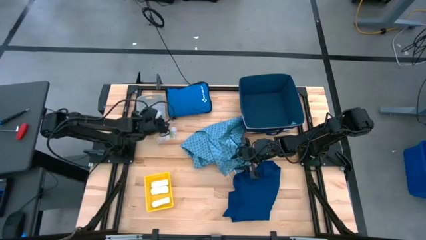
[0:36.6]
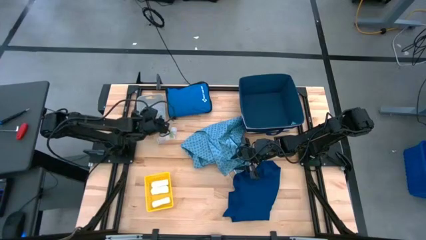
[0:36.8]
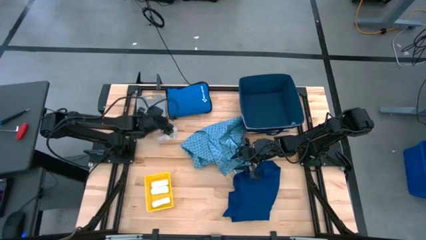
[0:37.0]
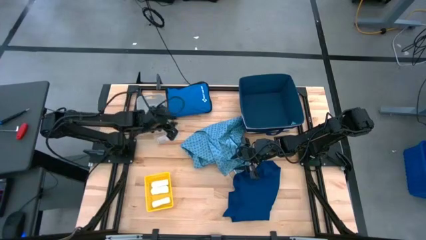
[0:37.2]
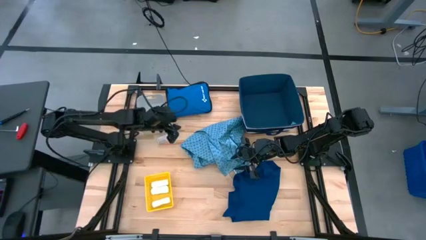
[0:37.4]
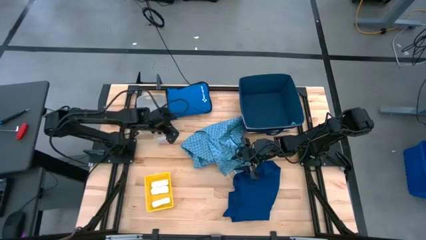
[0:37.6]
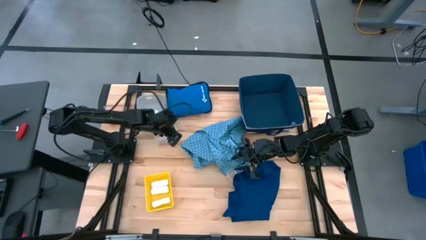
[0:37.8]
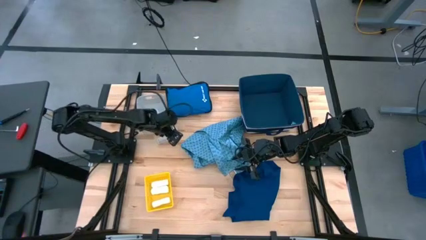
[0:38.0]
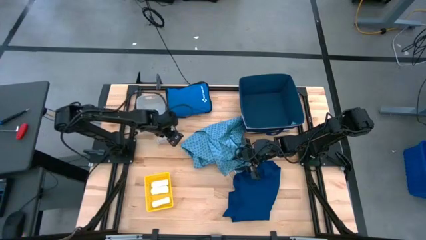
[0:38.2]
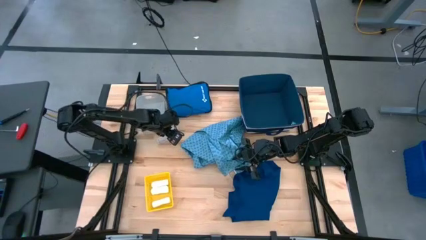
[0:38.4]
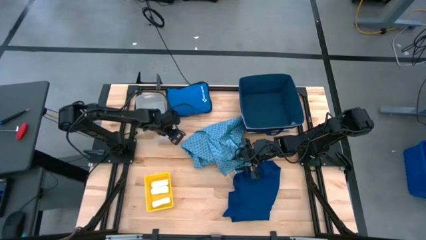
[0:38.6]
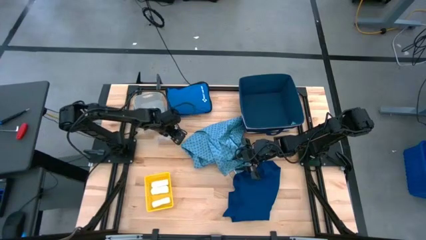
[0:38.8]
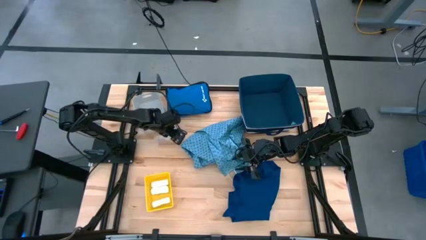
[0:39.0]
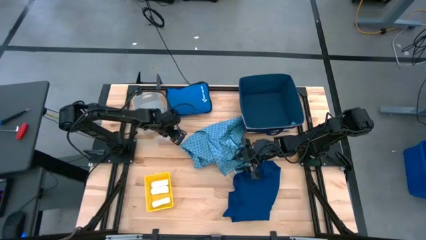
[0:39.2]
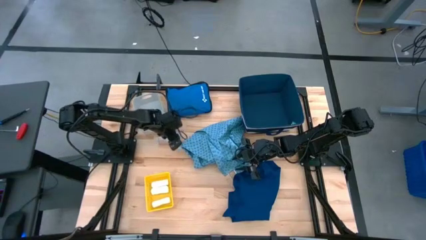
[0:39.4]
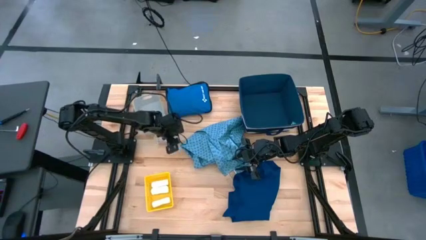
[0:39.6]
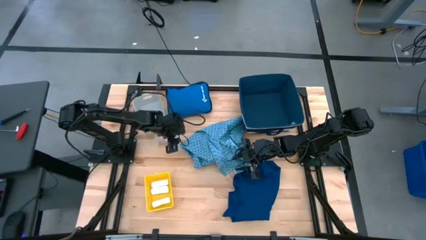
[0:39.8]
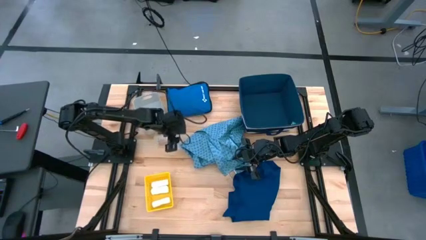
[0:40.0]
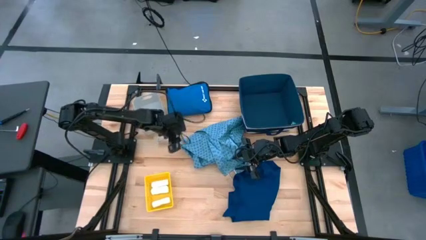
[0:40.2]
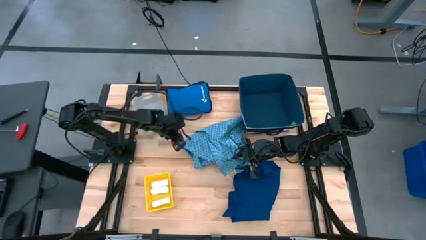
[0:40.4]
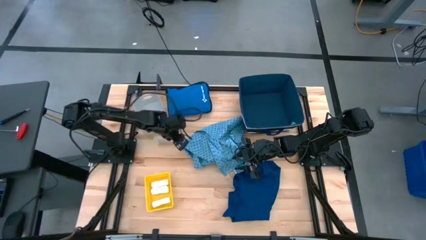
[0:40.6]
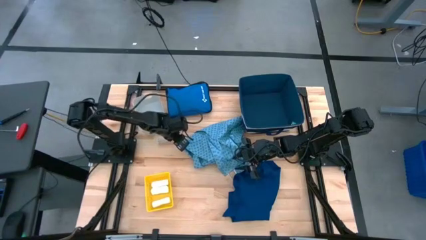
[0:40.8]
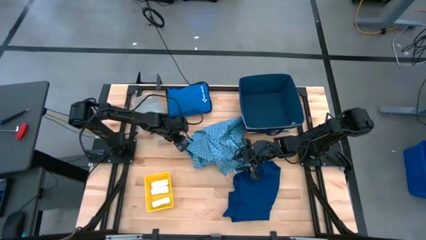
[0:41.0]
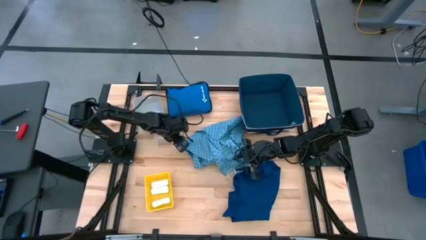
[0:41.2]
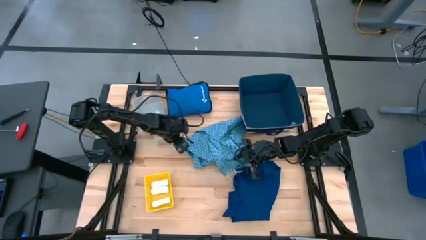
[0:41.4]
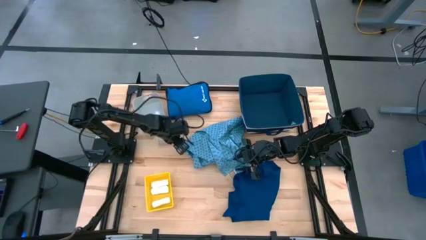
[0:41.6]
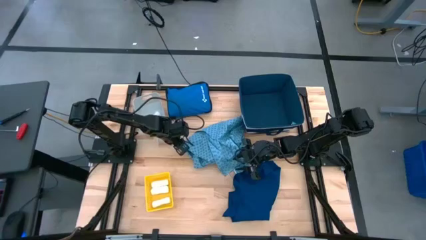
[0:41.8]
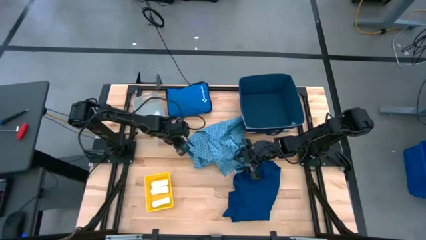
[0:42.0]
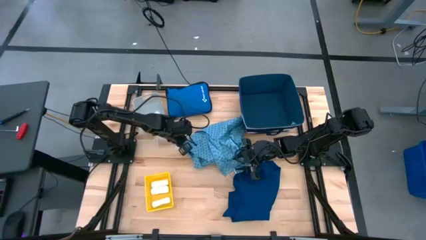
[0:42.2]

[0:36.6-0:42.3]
Task: Pick & place medical supplies in basket/bin
Put the white pill bottle into the gray bin

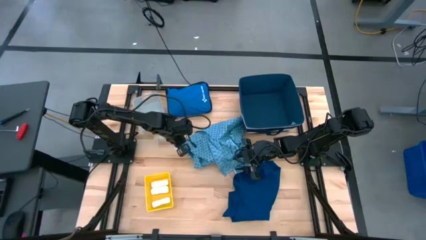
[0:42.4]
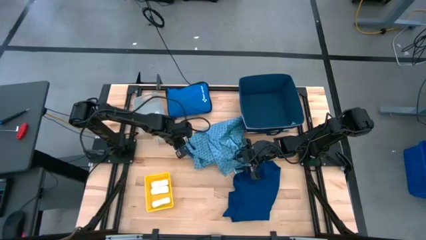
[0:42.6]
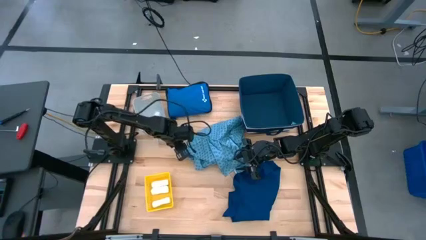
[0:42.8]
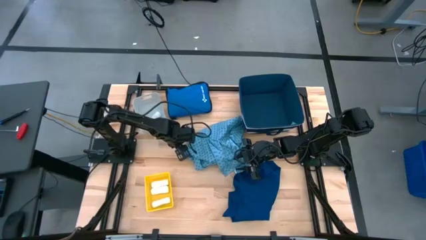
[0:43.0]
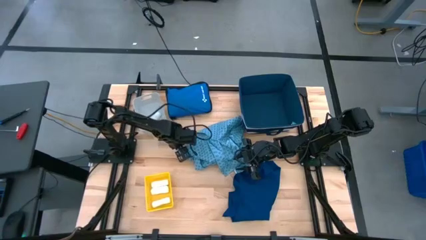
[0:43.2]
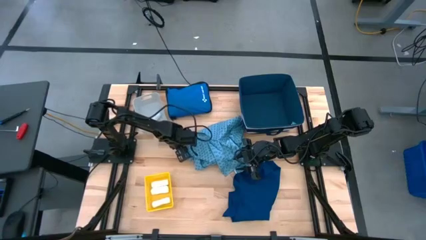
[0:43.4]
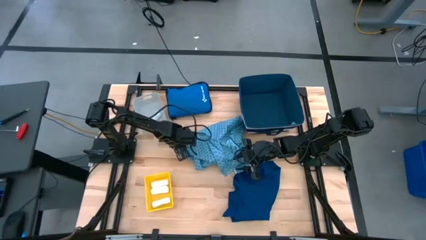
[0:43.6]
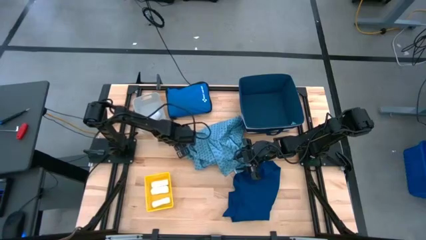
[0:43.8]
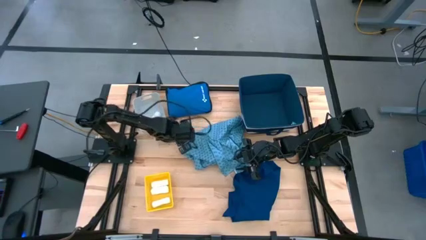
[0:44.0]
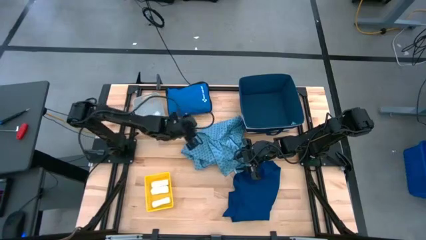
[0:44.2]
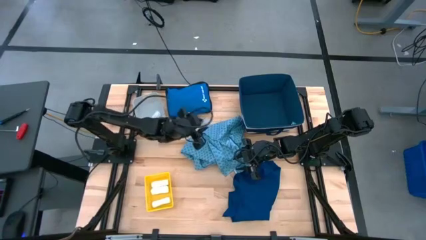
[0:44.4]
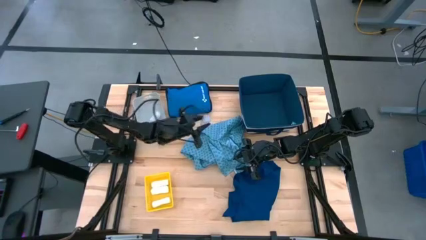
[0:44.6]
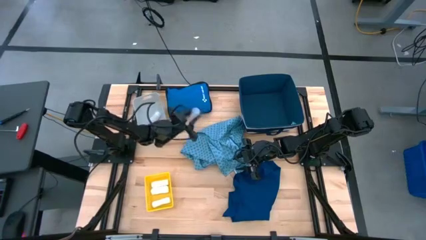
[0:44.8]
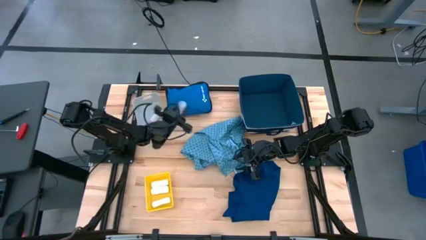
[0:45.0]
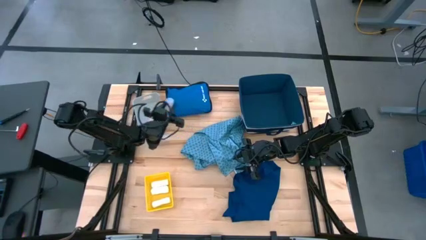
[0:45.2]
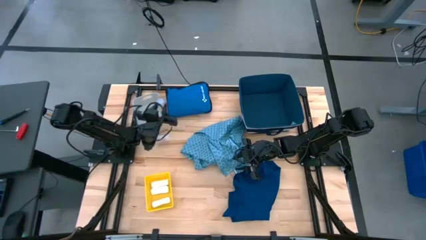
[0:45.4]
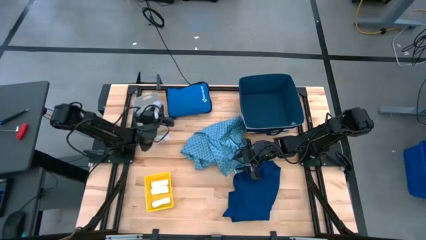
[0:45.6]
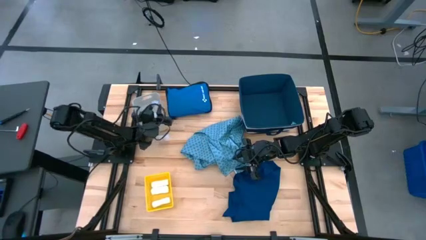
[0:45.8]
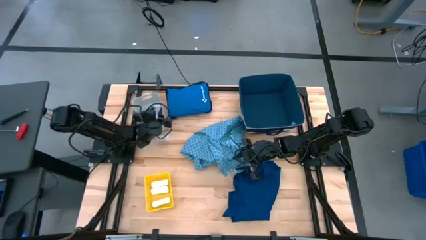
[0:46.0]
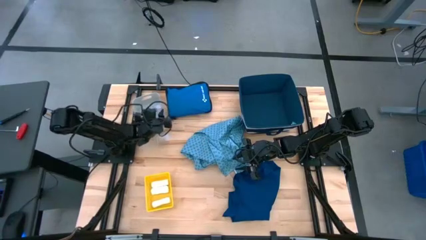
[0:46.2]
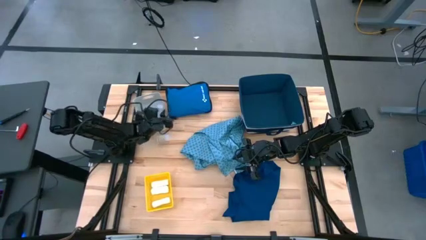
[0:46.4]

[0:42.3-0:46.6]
Put the white pill bottle into the gray bin

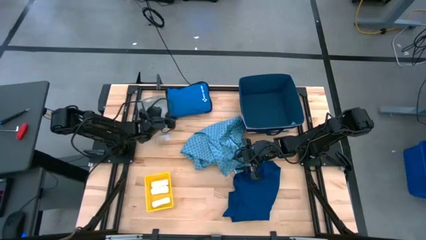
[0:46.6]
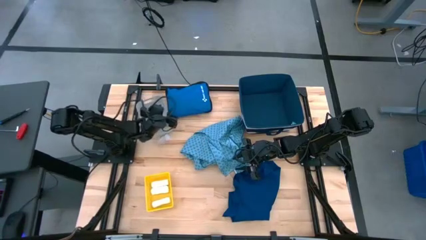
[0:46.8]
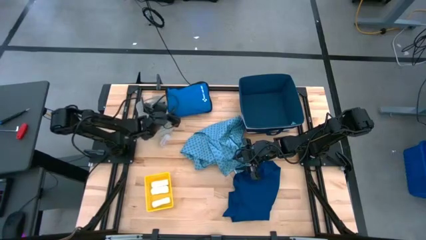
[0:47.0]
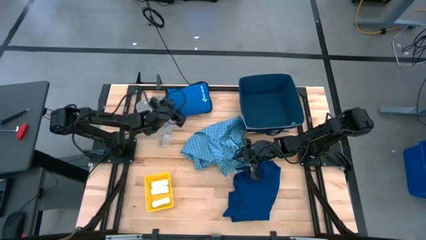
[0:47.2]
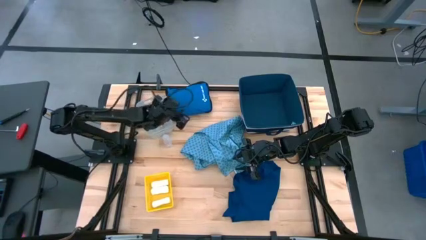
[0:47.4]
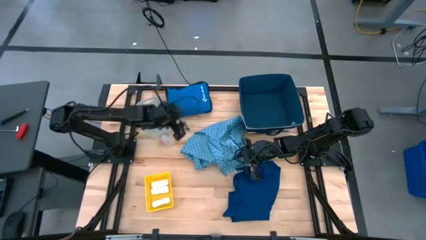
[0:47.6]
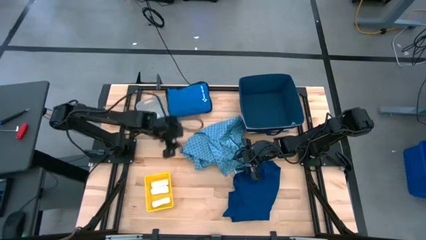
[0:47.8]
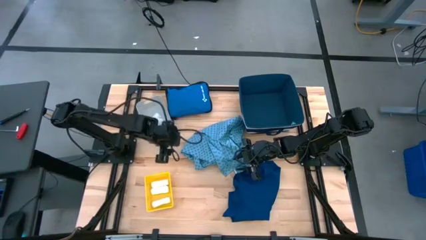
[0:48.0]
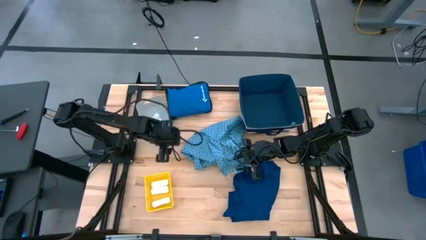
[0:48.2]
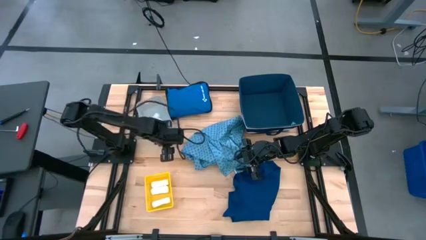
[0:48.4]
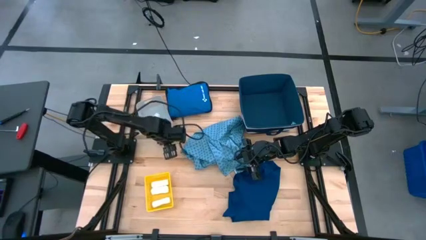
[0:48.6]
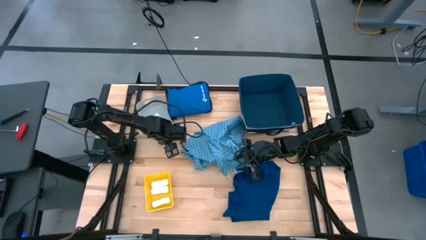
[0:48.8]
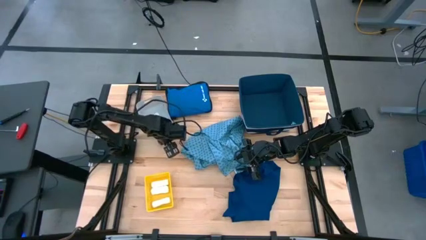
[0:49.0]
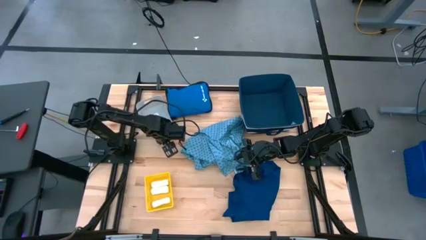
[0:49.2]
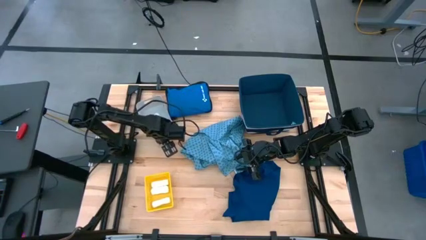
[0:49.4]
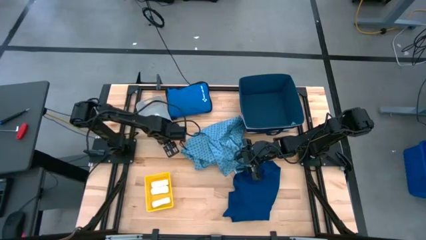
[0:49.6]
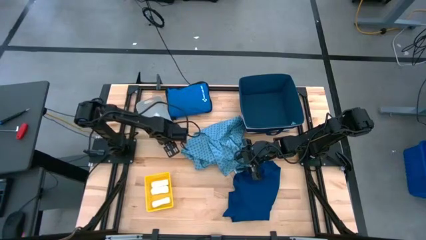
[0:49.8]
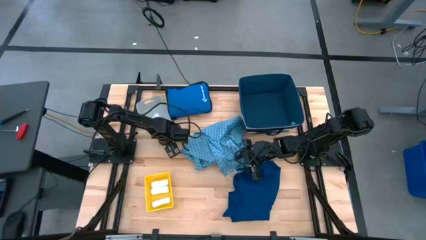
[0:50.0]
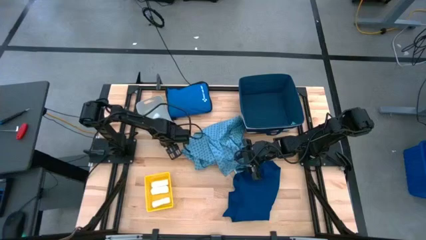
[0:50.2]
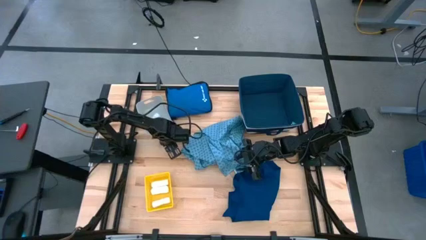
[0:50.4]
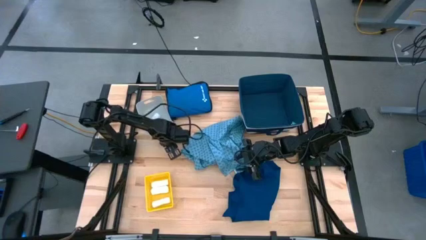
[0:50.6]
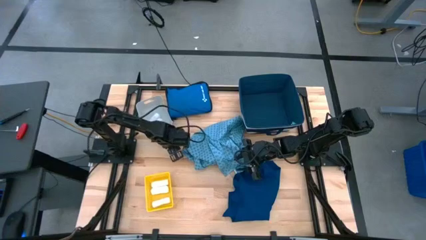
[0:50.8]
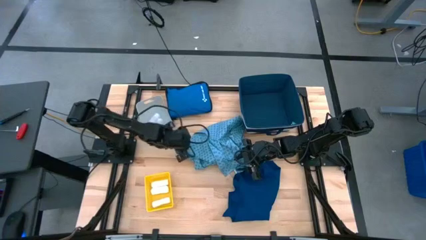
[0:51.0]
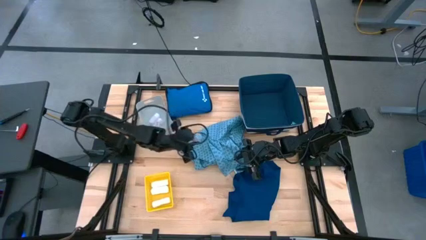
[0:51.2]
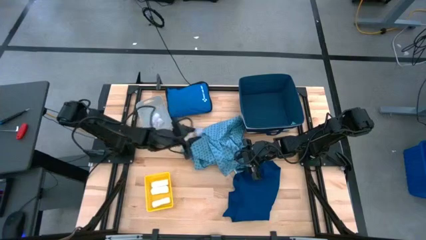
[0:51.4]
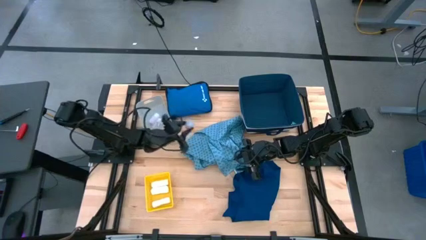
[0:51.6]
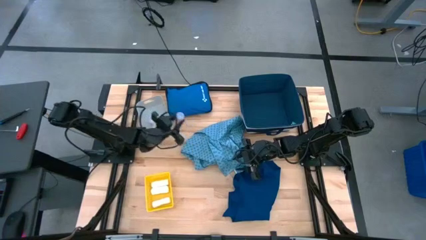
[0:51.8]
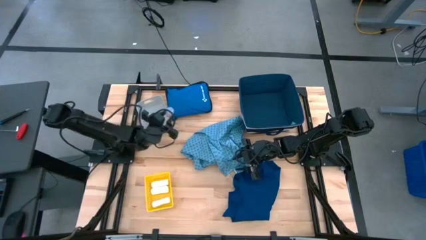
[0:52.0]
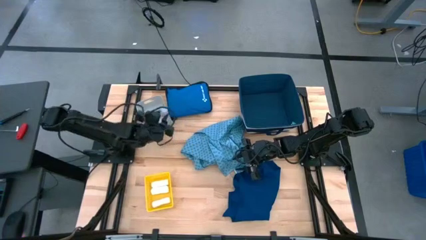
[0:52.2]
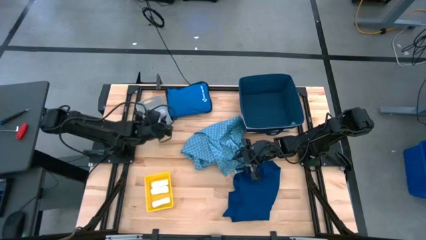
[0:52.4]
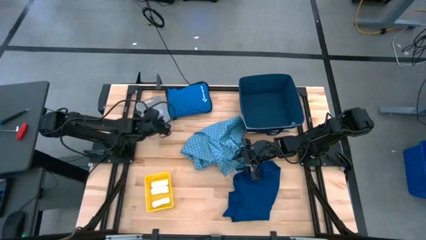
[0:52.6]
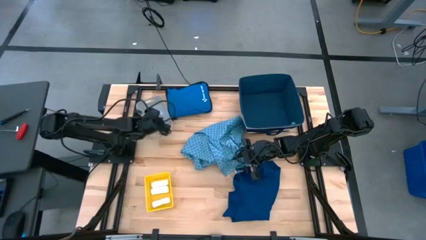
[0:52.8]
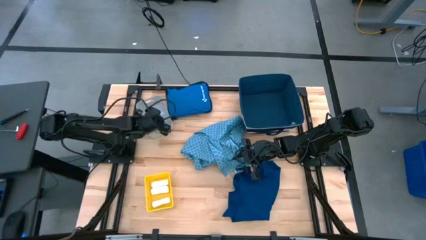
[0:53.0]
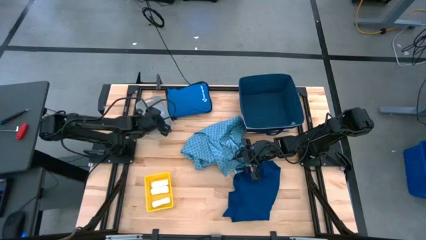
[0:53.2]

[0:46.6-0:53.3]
Put the white pill bottle into the gray bin

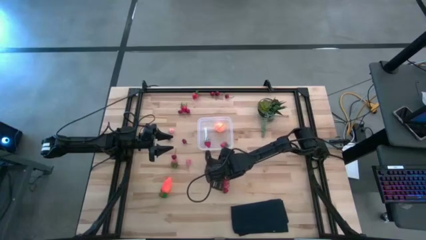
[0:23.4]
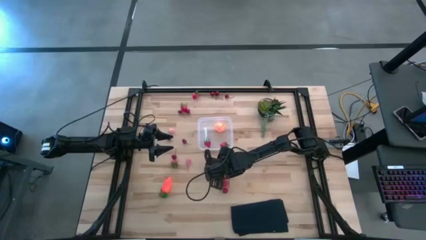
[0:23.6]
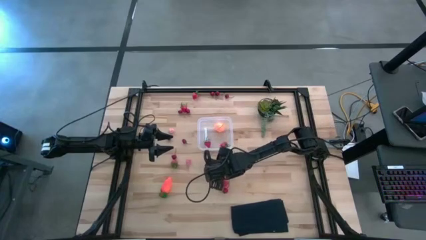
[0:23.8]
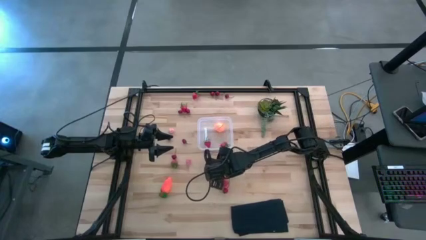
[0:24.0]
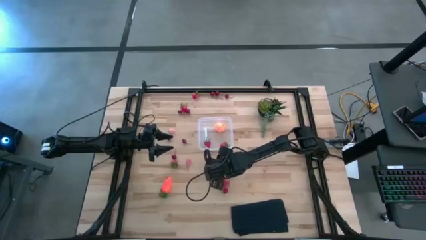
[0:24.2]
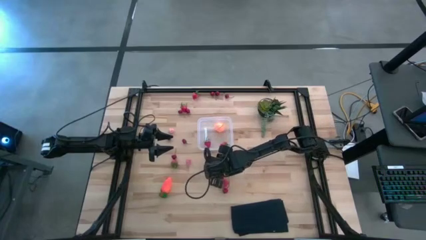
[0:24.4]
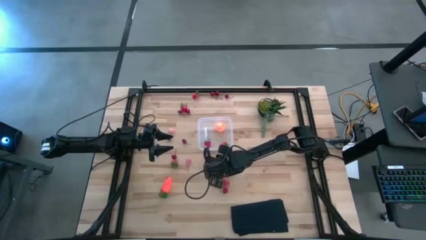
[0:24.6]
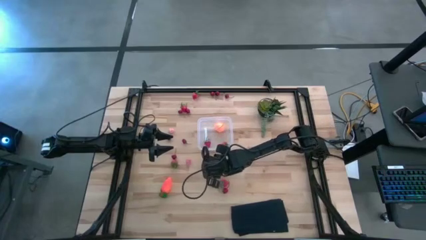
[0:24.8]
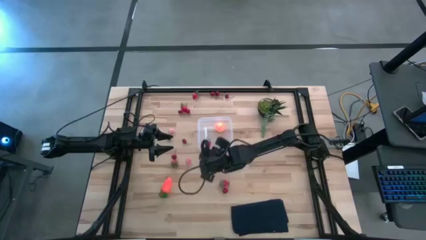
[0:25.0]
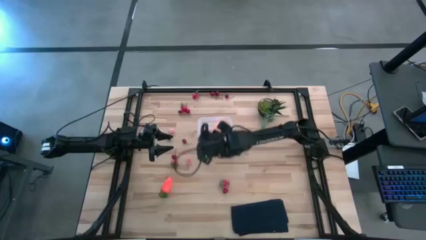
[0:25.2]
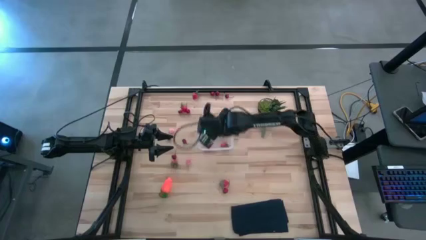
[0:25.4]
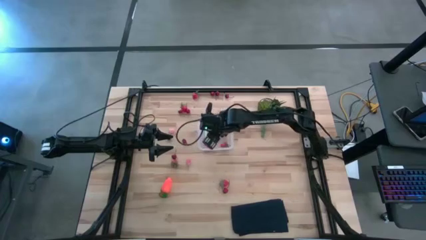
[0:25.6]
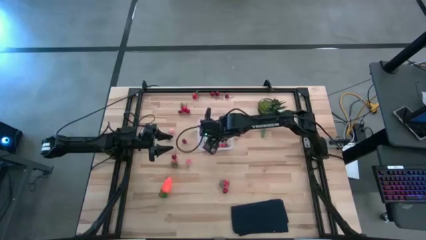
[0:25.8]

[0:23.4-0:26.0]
Task: Pick and placing Produce into tupperware
Put the strawberry into the transparent bin
